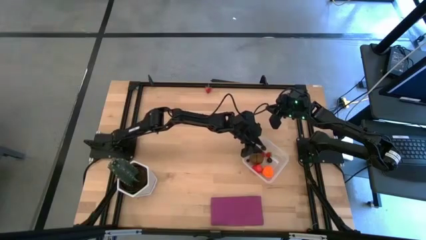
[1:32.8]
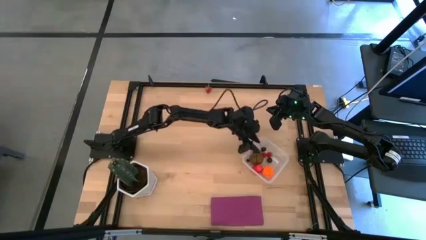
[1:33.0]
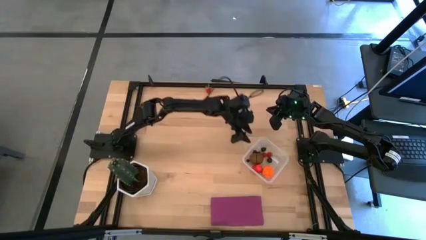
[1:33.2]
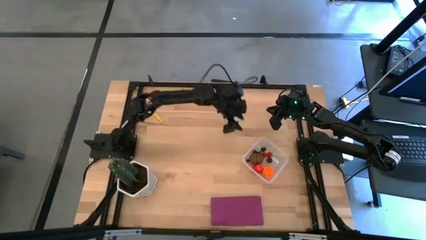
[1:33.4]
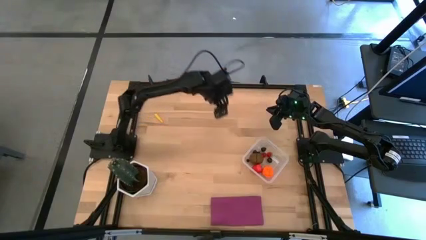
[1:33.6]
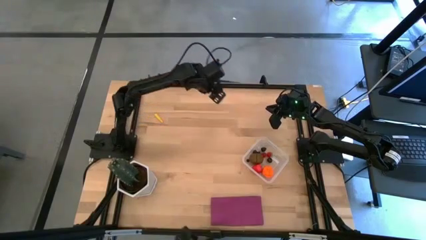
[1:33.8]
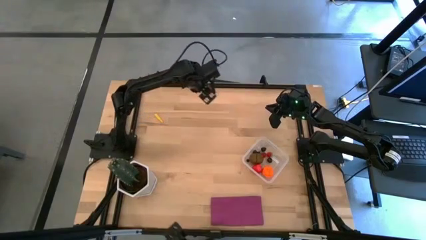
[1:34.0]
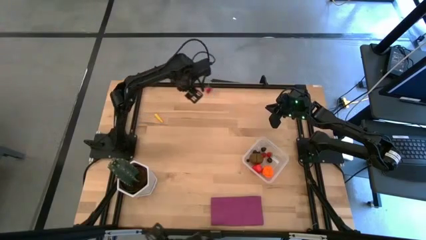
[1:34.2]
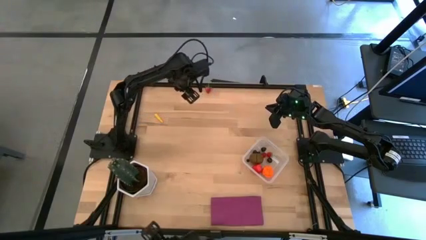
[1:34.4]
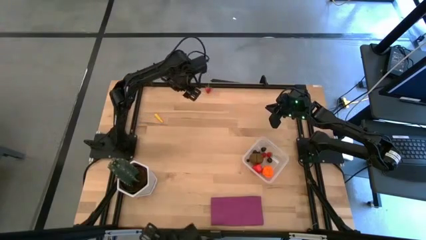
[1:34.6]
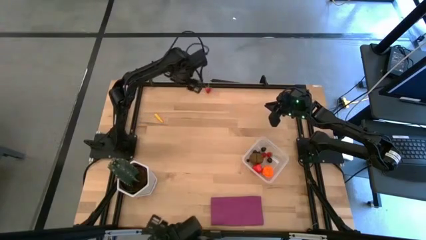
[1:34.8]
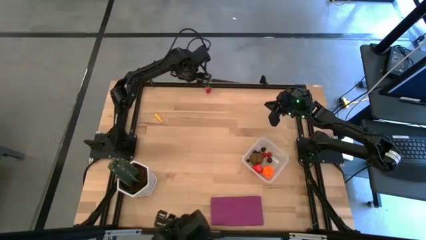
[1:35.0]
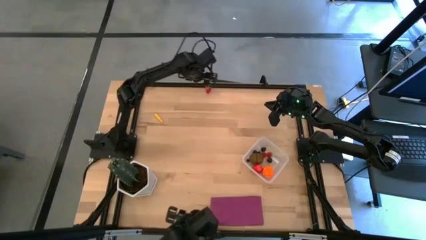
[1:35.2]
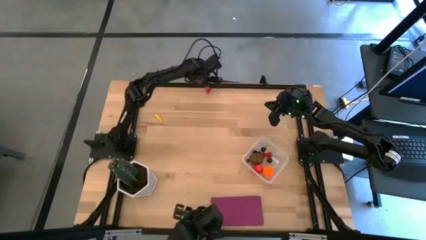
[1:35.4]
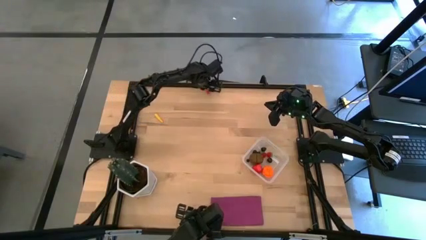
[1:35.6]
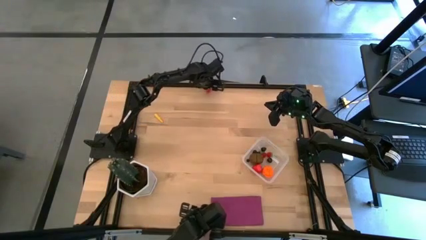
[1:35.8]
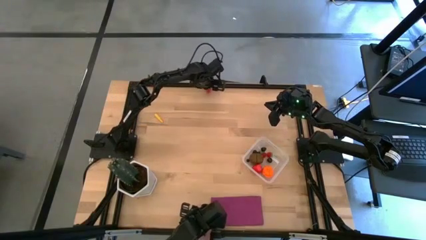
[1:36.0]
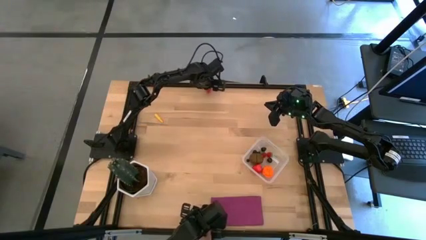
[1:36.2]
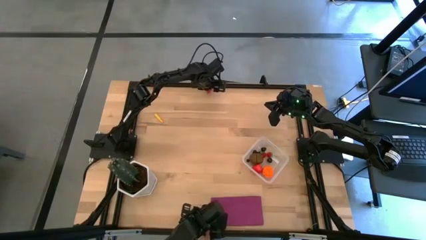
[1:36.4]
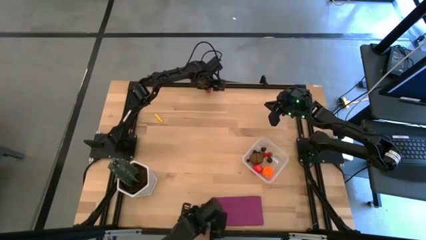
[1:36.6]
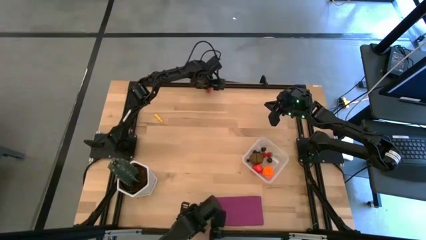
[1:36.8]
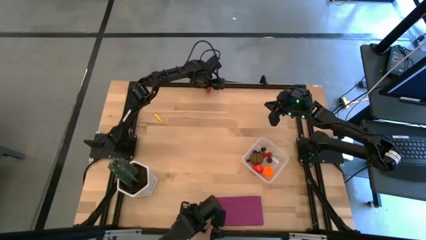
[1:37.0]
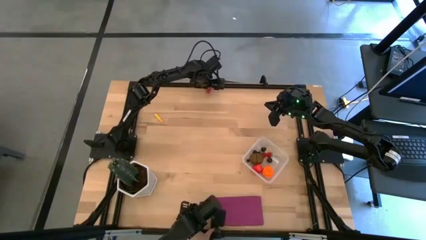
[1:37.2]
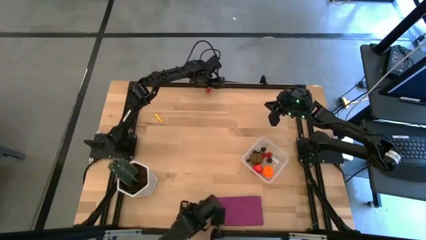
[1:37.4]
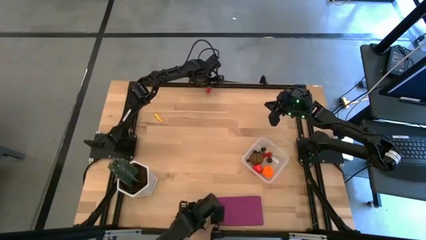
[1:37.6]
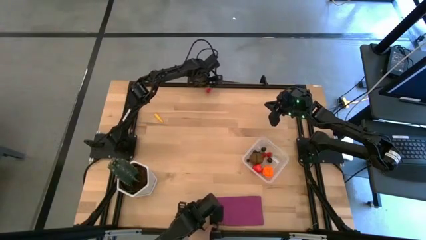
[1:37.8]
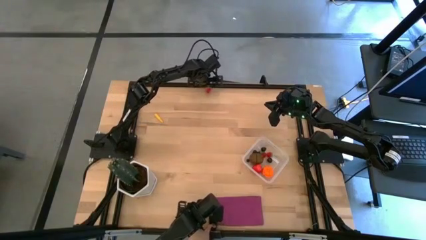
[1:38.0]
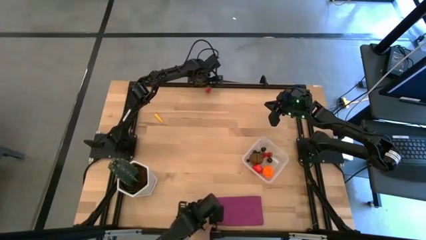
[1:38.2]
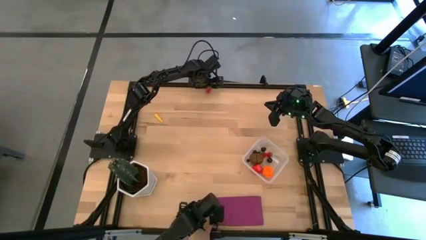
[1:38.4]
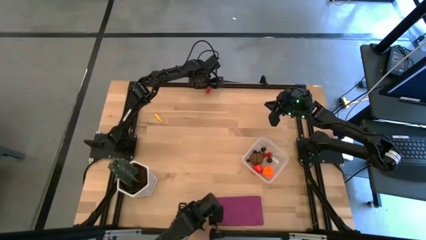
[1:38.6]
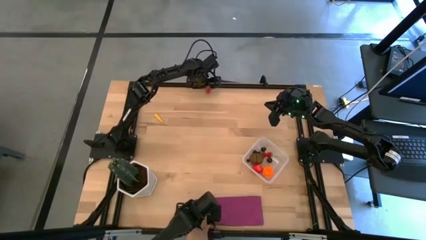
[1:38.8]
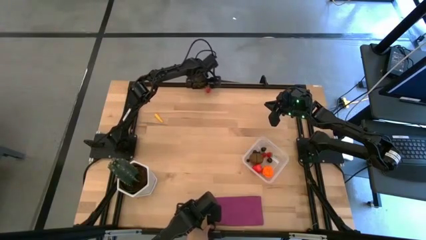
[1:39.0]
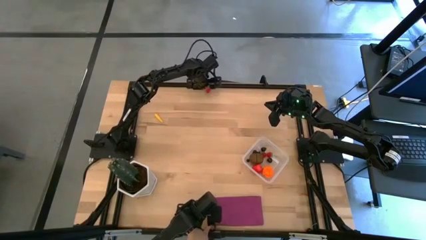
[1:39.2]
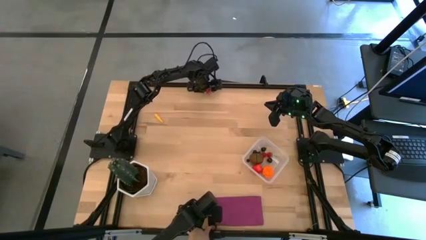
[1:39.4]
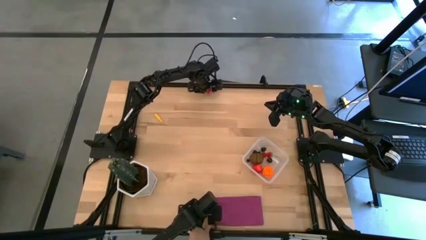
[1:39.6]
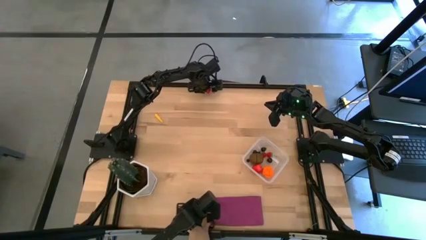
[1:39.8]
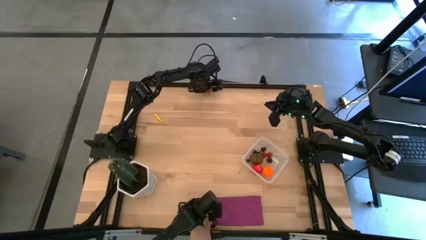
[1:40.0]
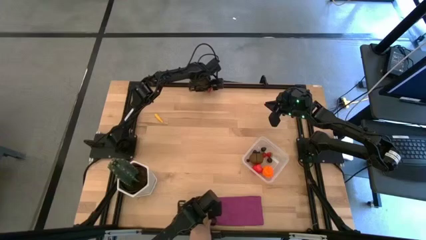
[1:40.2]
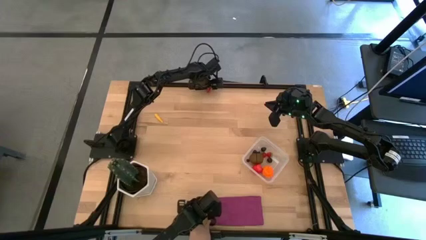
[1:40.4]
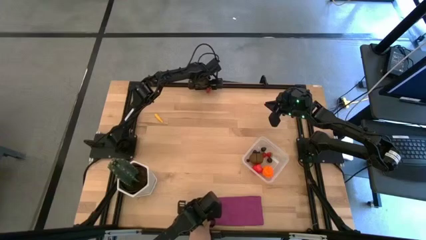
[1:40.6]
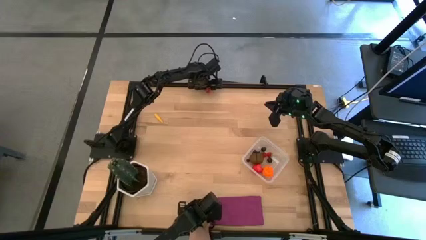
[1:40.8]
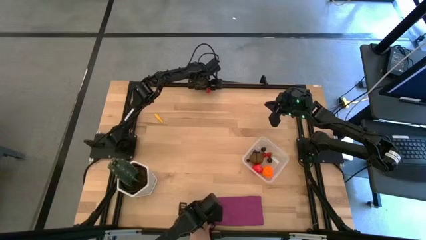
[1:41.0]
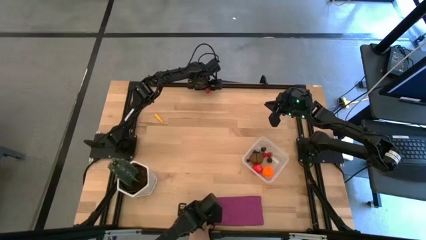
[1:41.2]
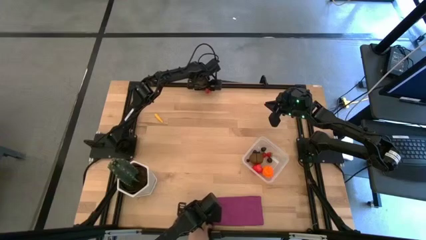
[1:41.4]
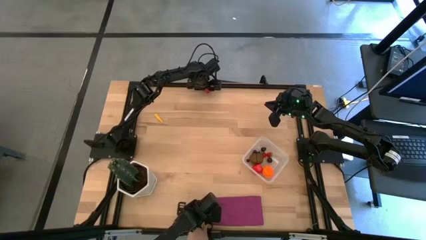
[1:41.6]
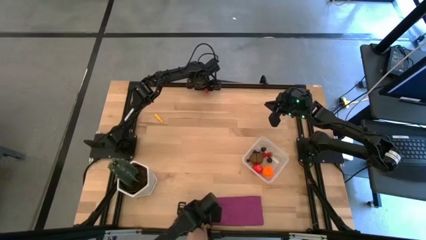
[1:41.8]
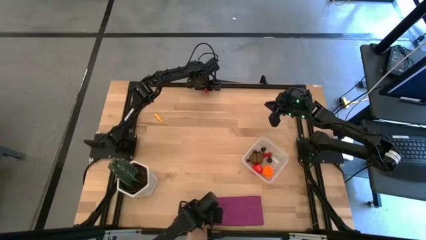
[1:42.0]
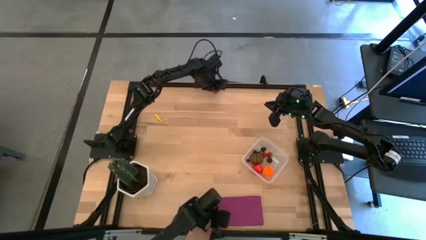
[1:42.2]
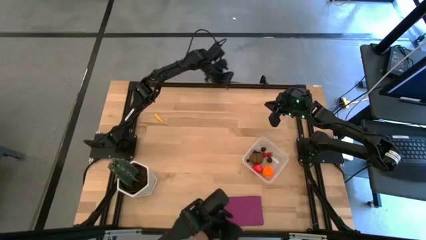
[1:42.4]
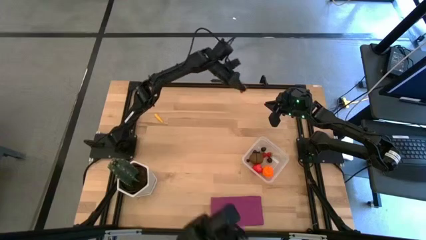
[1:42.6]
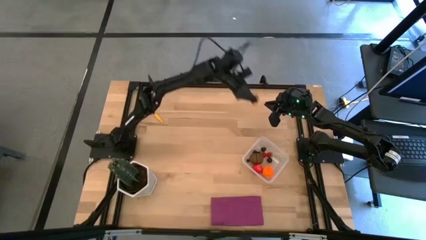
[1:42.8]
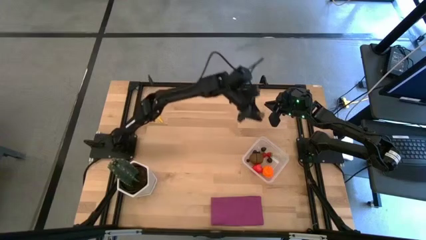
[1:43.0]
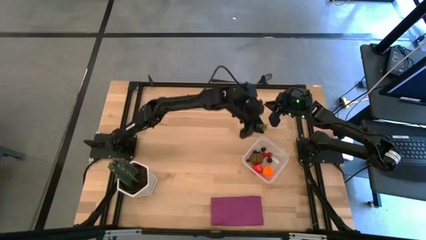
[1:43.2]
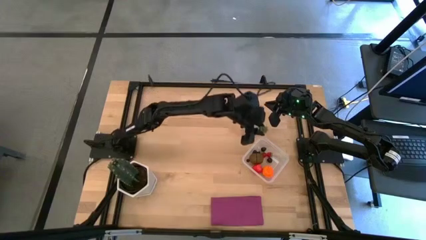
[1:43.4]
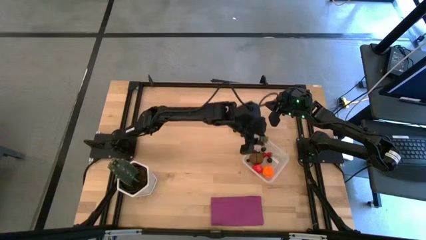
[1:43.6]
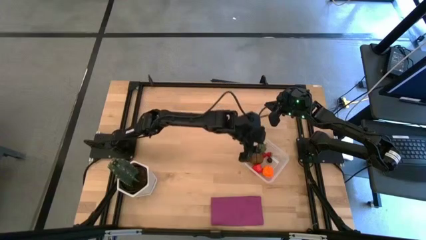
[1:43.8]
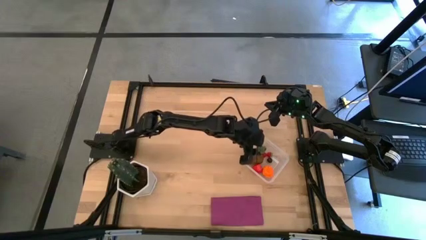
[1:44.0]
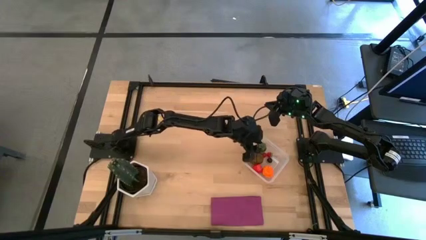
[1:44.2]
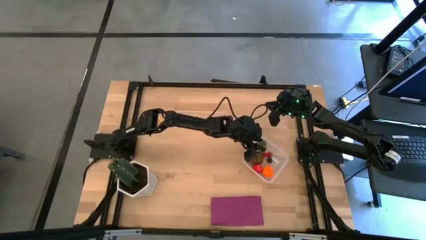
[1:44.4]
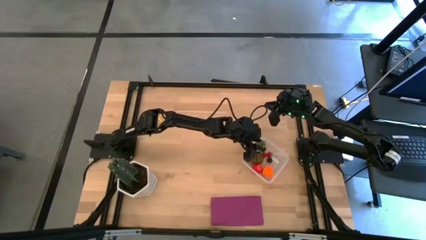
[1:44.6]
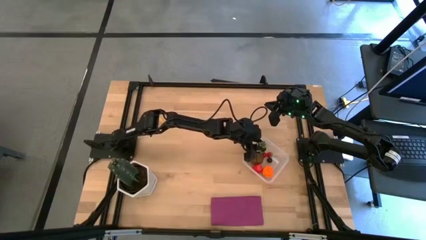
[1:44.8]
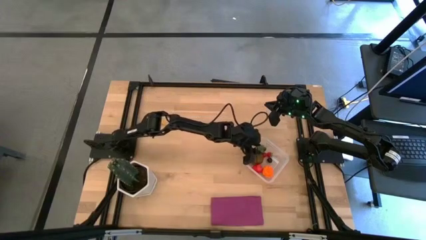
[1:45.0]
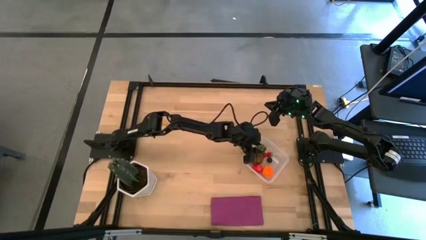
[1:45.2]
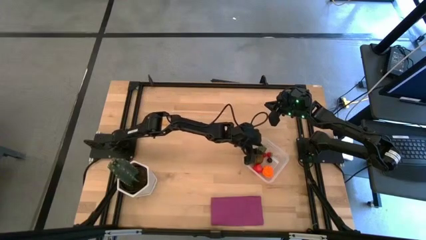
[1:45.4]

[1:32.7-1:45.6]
Task: Pick and placing Produce into tupperware
Put the strawberry into the transparent bin
